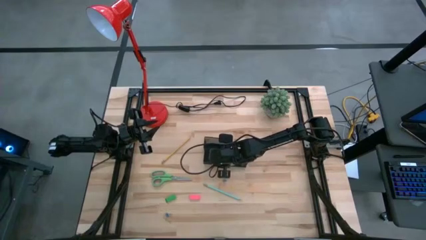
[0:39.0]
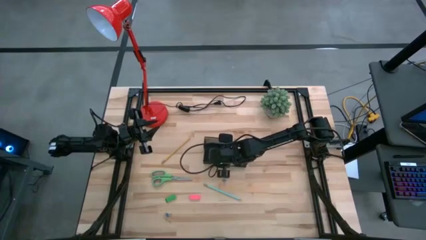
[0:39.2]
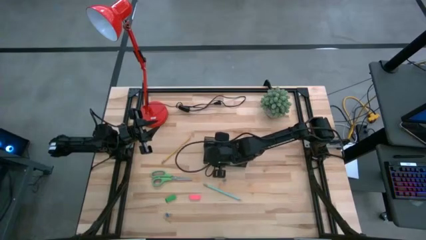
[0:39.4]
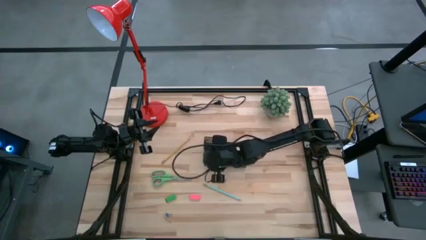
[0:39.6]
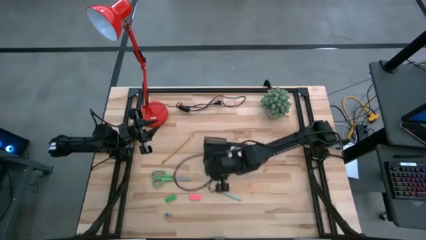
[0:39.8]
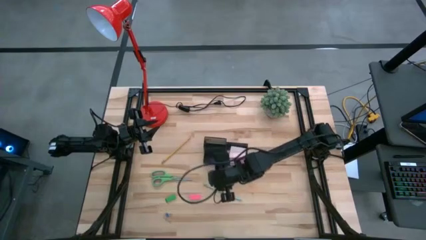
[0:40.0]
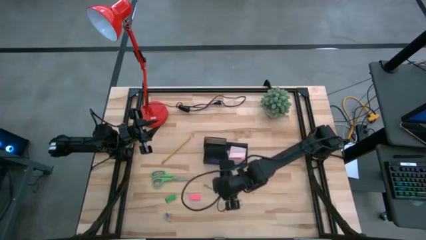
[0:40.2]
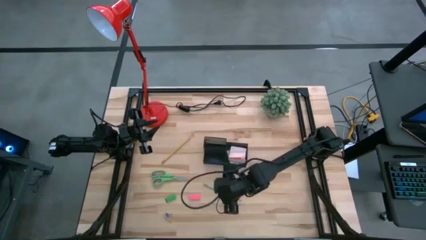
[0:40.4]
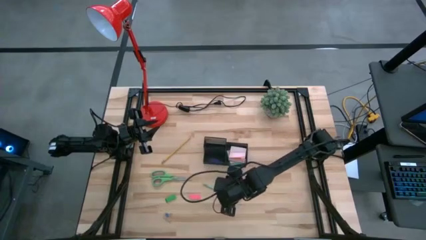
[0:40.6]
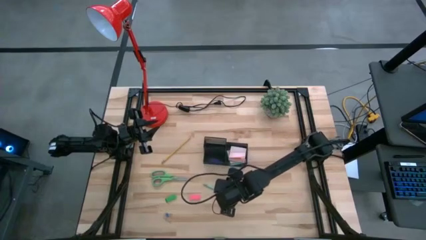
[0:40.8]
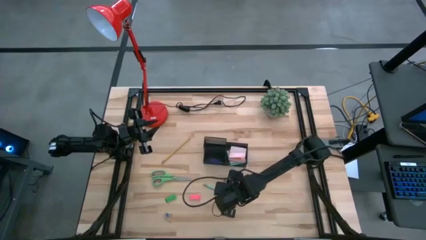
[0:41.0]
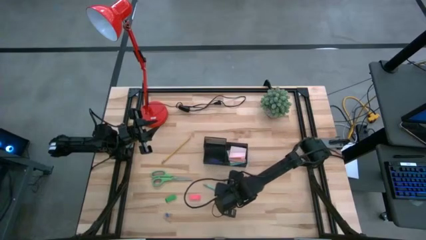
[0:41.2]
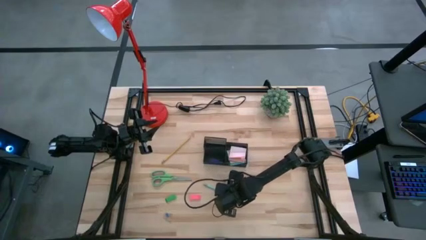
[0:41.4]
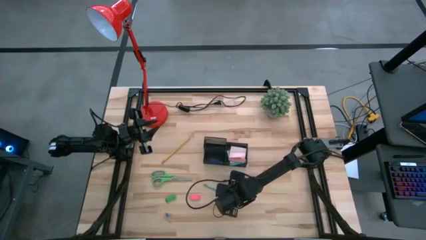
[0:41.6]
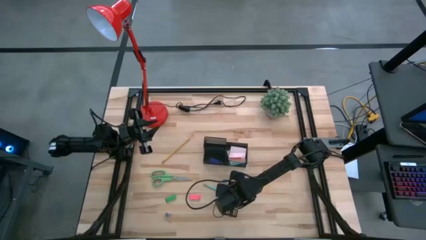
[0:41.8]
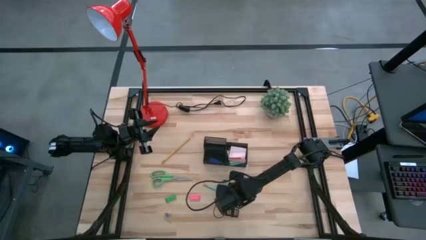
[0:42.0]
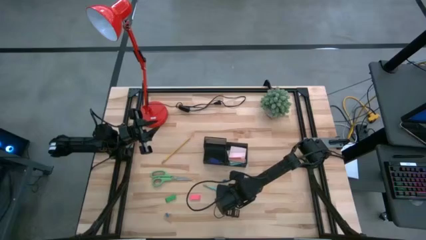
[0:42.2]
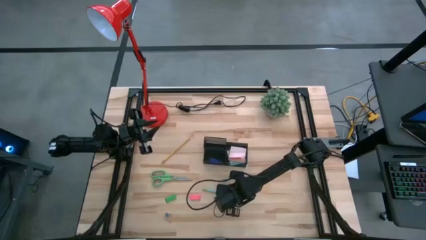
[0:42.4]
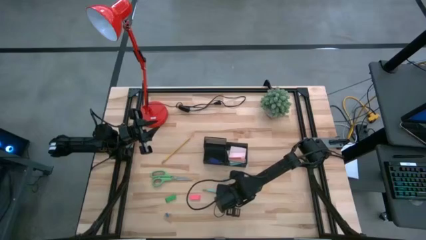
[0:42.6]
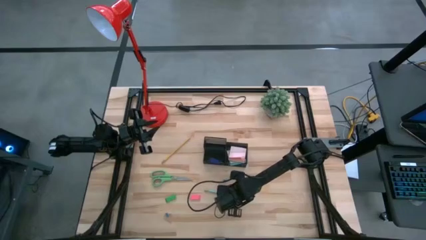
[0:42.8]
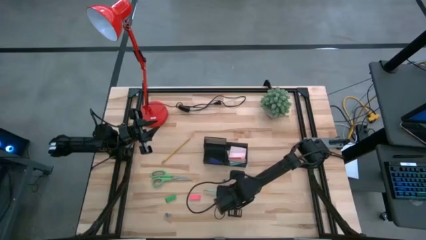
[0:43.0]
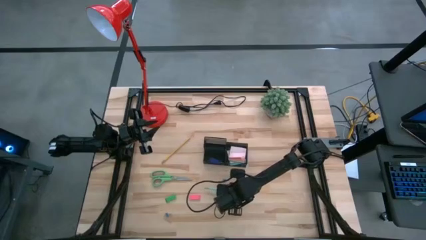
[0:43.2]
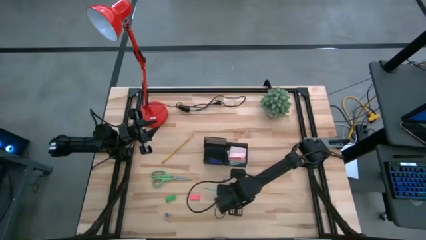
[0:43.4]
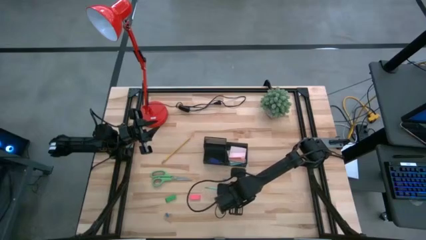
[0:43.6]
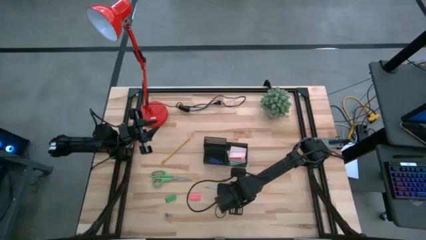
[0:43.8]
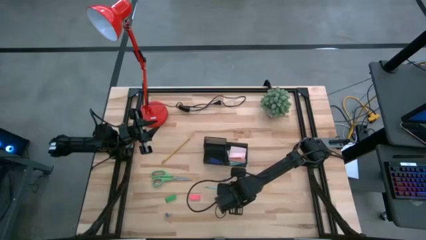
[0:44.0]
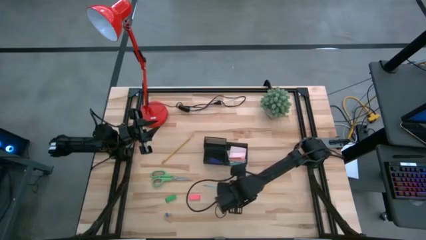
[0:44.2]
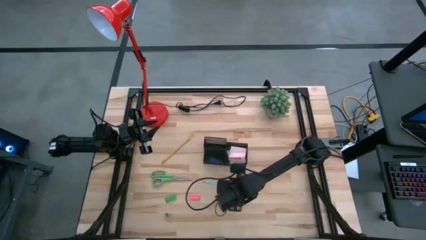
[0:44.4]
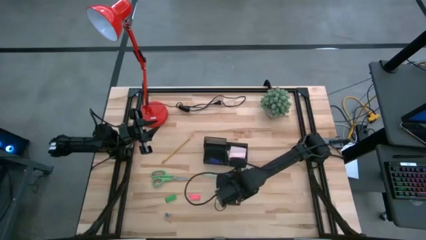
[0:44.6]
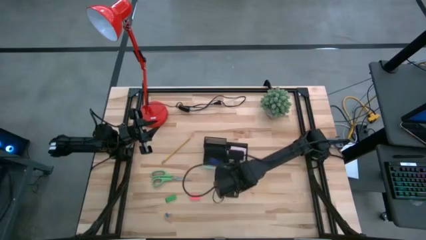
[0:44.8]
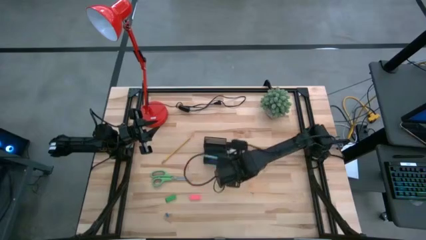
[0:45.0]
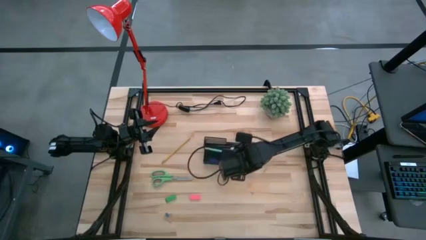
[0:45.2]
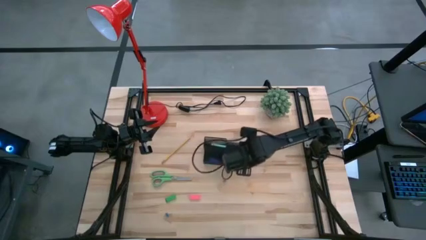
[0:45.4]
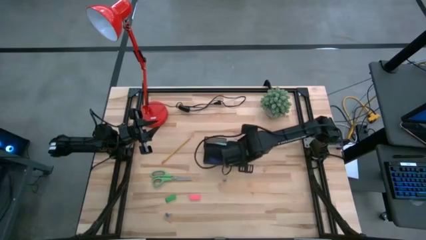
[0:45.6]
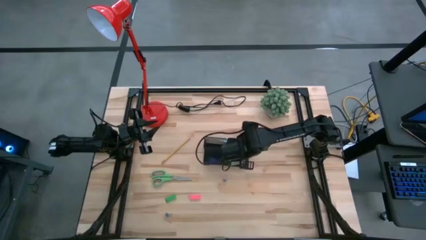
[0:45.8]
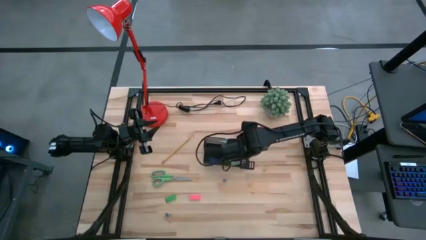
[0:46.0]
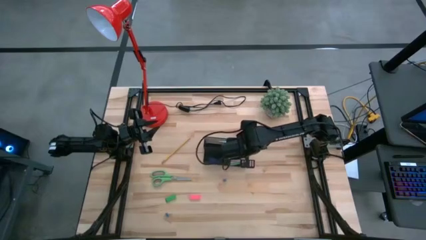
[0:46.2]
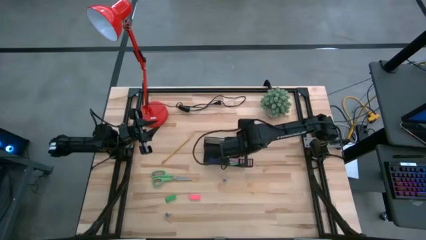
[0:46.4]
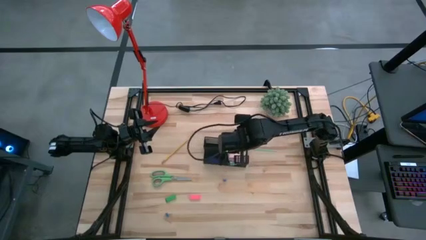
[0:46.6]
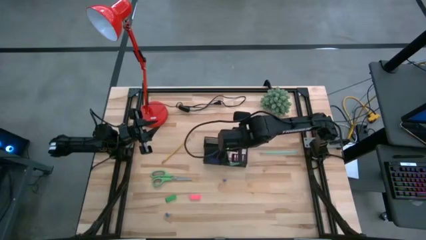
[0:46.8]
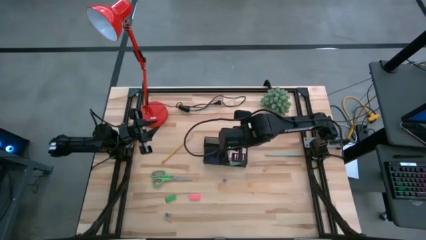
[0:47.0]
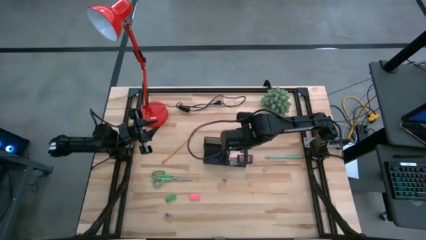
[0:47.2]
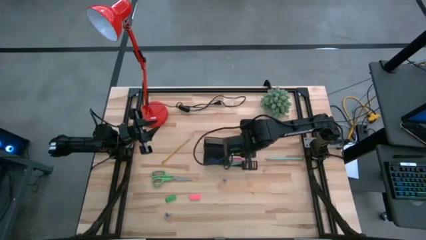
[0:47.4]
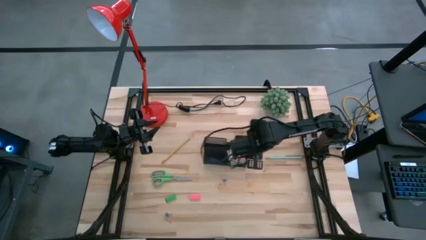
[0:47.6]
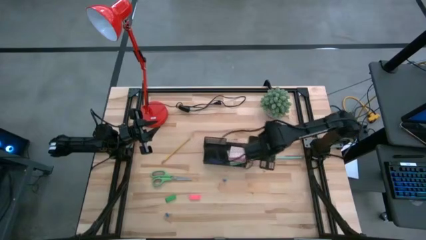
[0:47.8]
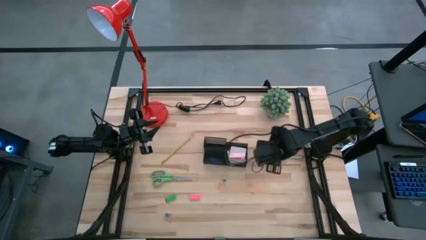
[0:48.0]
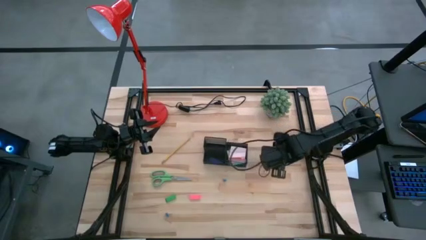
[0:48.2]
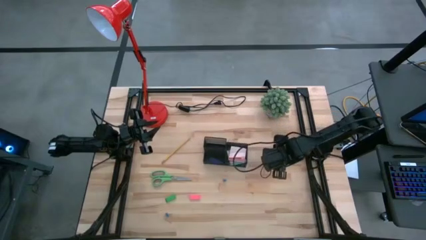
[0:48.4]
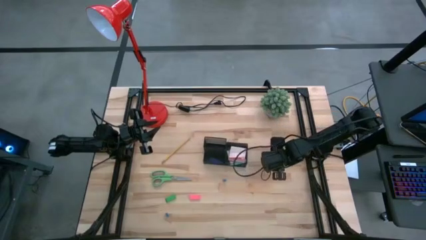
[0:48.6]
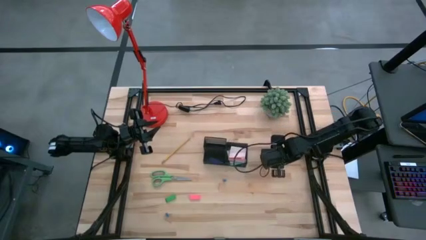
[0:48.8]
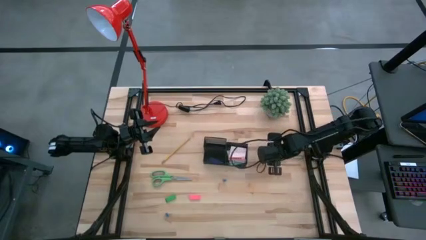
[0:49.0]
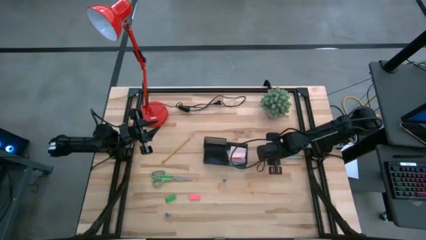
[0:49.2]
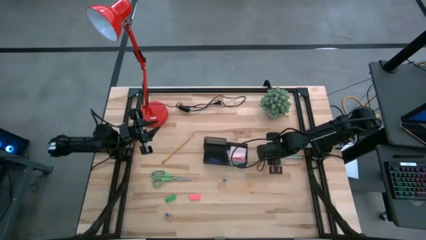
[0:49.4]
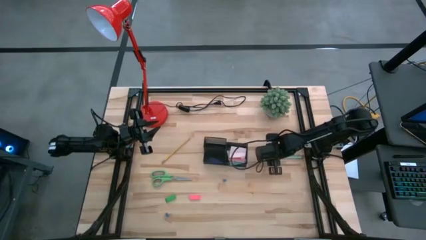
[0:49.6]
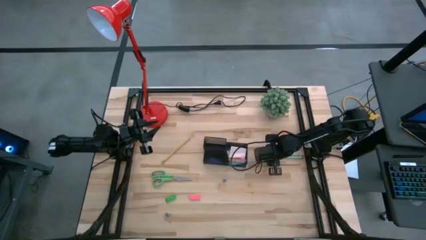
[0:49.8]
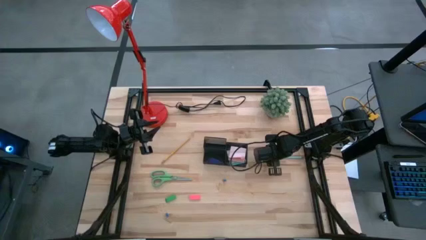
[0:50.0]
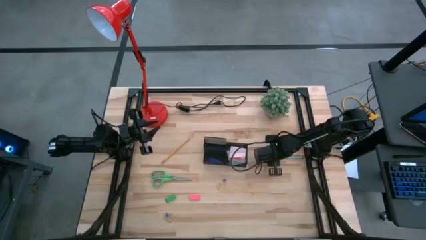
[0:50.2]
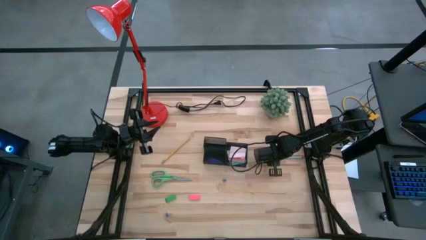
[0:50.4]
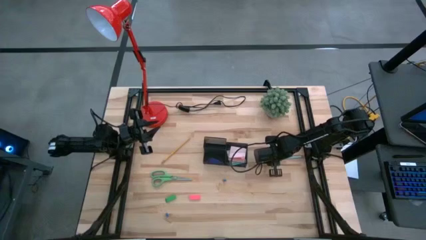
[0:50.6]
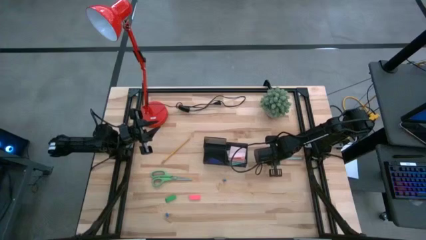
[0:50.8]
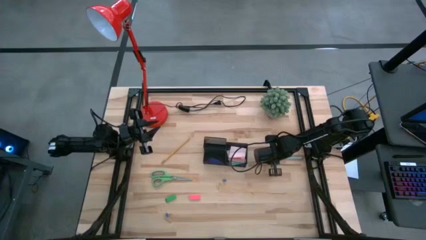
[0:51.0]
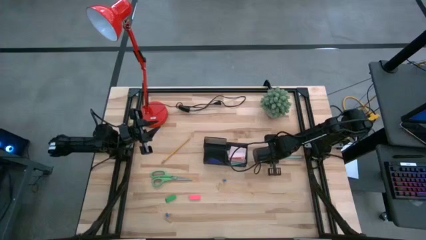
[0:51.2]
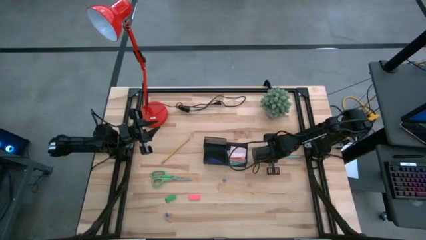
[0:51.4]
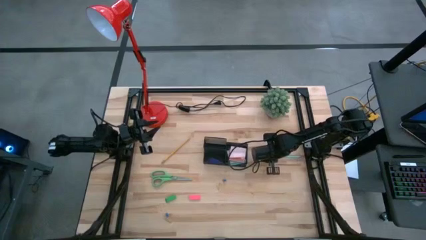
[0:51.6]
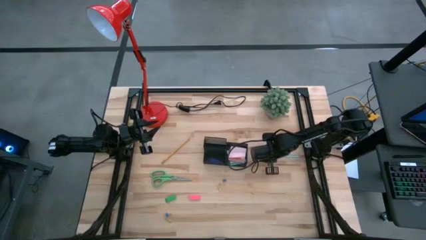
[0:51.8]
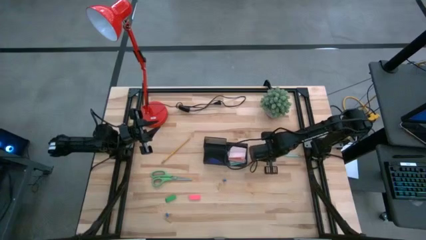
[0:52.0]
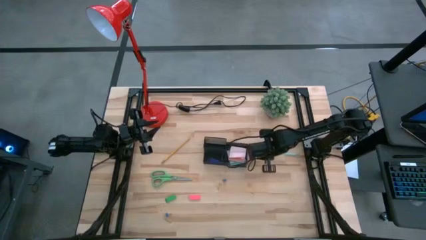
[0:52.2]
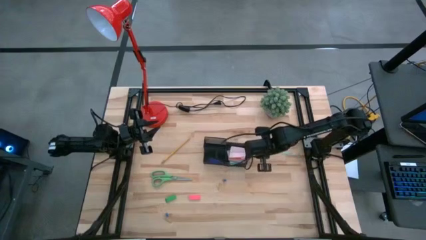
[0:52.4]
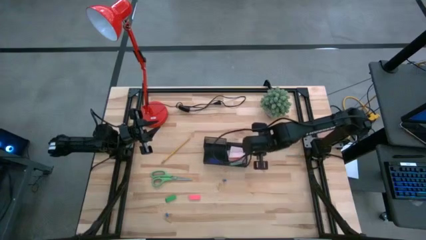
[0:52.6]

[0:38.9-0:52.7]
Task: Pick and place office supplies into organizer
Put the light blue pencil into the black desk organizer
